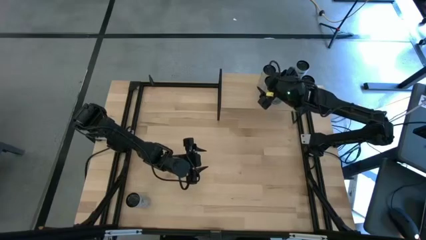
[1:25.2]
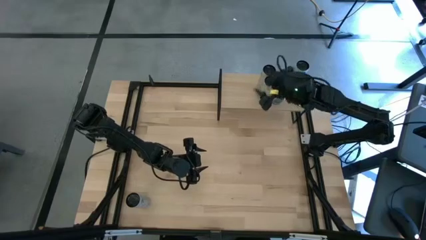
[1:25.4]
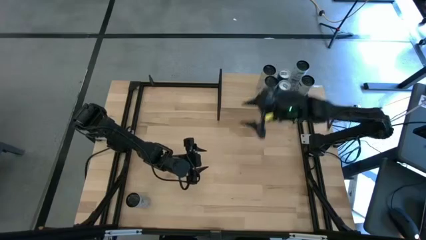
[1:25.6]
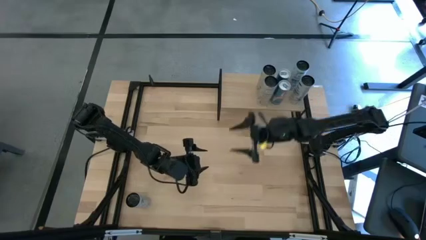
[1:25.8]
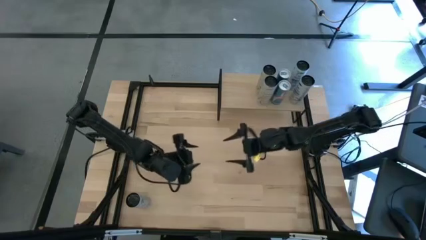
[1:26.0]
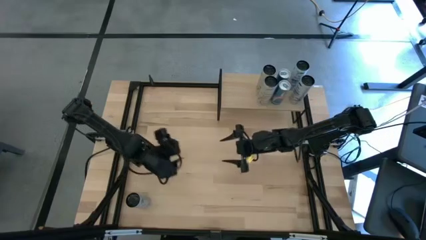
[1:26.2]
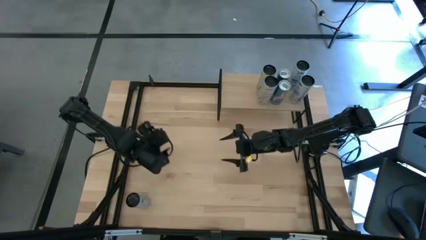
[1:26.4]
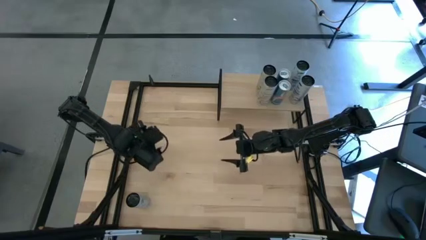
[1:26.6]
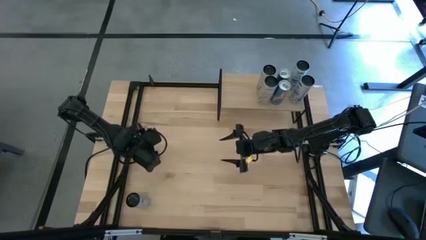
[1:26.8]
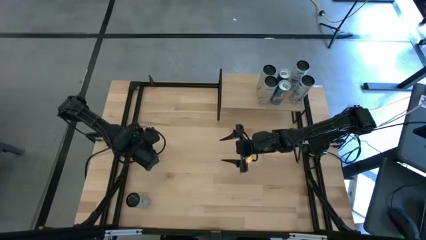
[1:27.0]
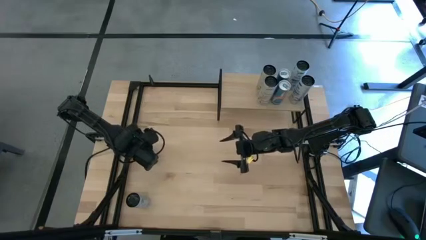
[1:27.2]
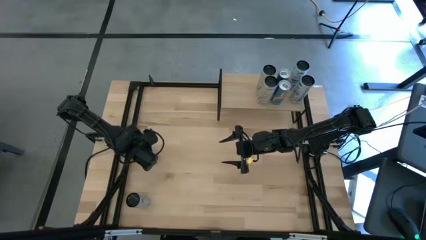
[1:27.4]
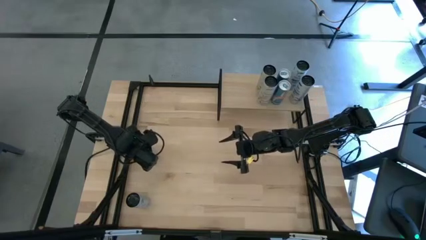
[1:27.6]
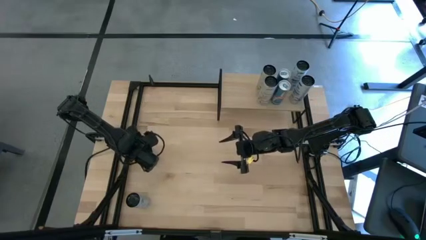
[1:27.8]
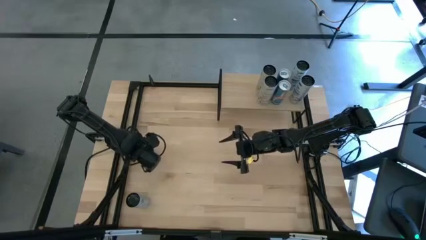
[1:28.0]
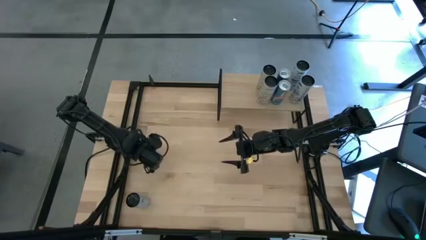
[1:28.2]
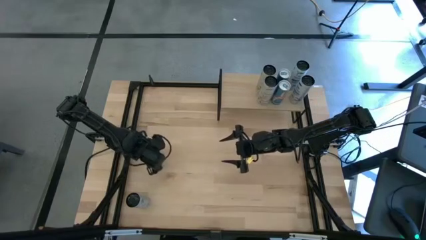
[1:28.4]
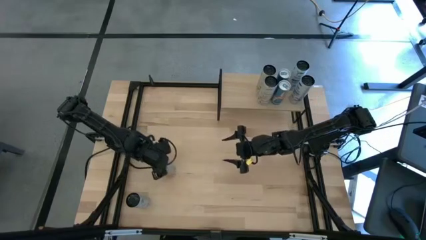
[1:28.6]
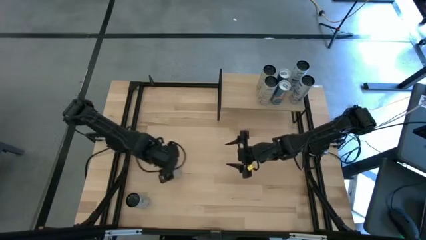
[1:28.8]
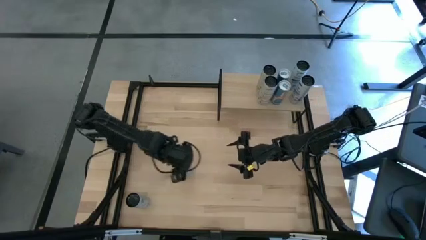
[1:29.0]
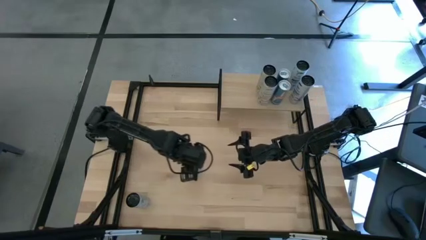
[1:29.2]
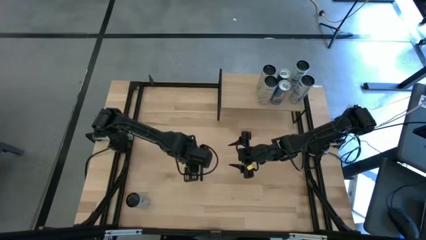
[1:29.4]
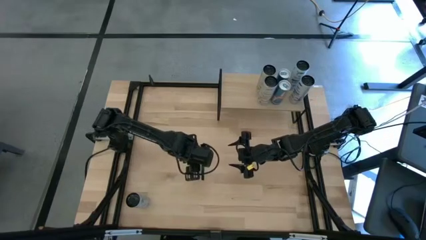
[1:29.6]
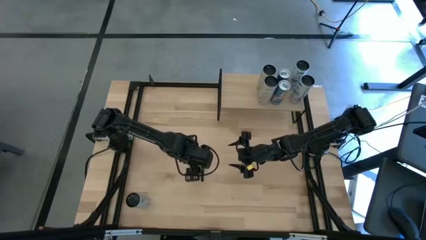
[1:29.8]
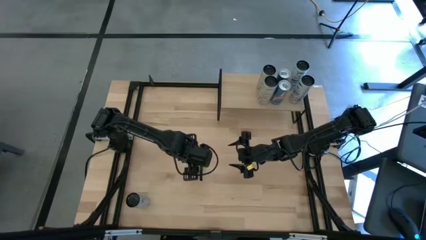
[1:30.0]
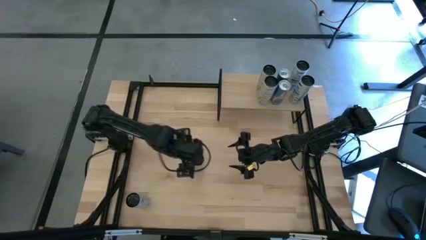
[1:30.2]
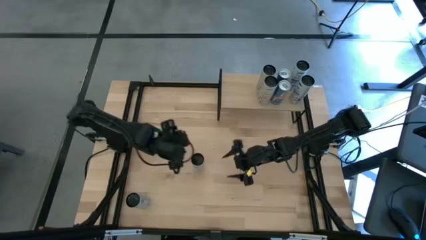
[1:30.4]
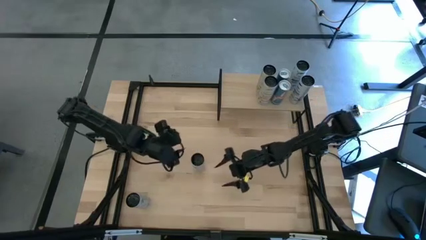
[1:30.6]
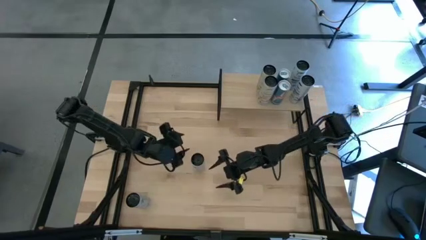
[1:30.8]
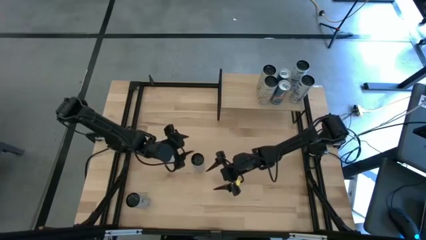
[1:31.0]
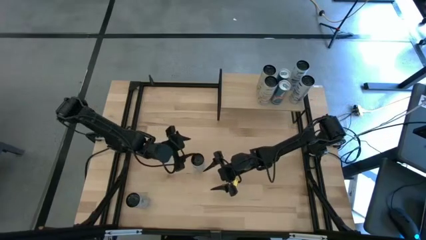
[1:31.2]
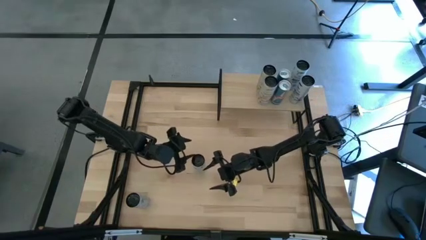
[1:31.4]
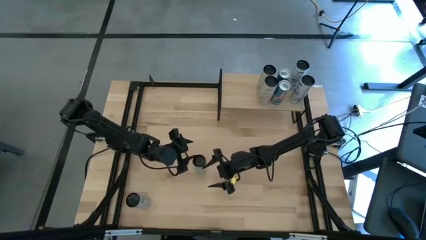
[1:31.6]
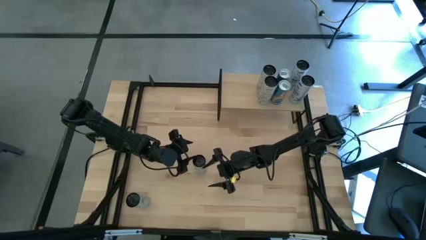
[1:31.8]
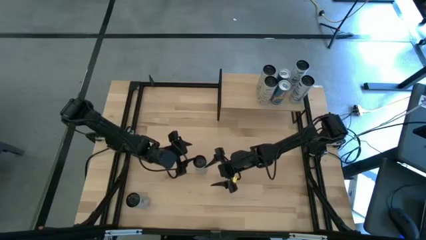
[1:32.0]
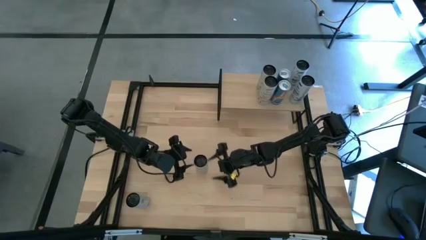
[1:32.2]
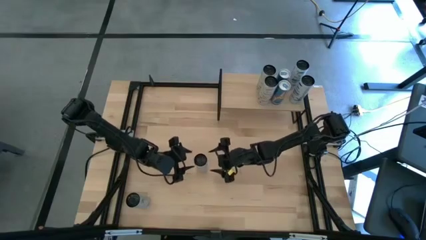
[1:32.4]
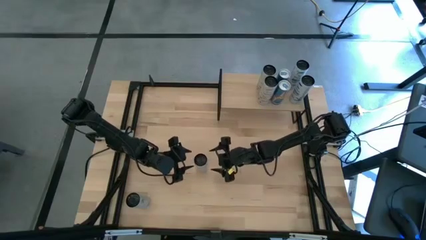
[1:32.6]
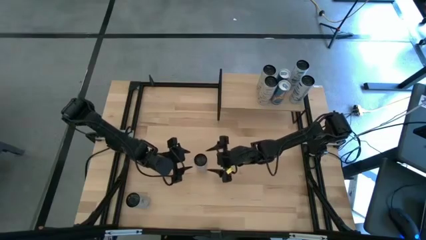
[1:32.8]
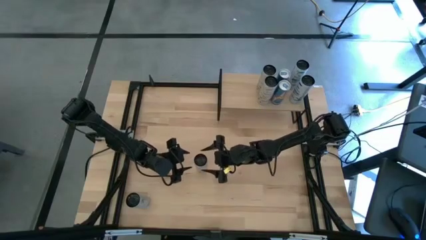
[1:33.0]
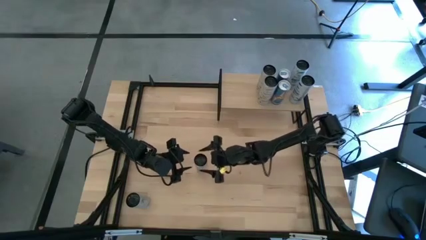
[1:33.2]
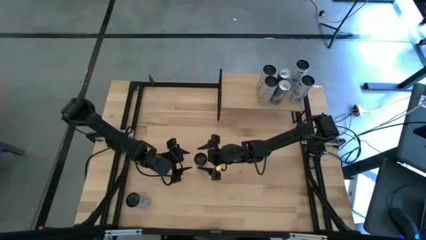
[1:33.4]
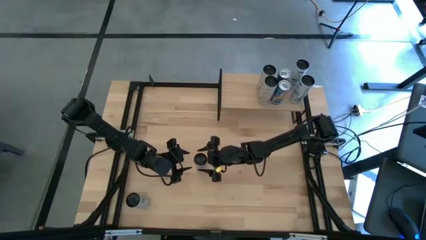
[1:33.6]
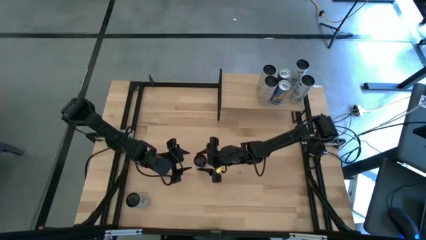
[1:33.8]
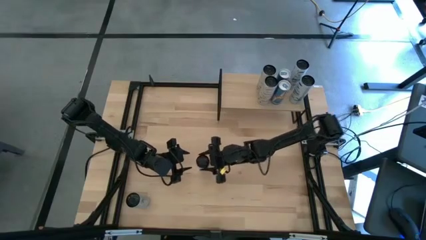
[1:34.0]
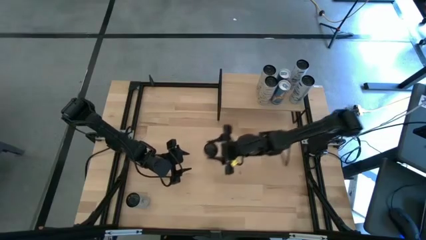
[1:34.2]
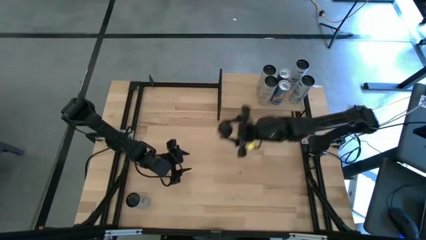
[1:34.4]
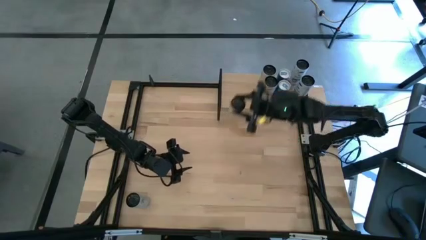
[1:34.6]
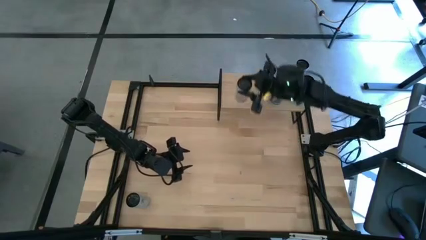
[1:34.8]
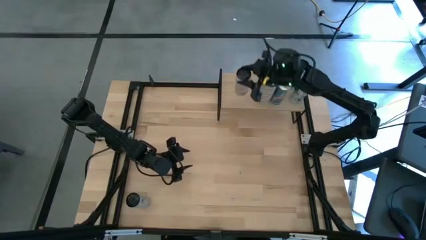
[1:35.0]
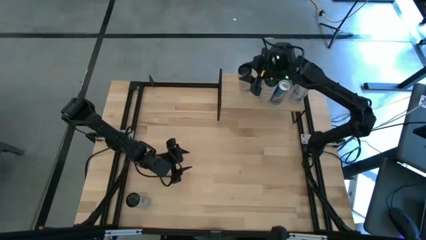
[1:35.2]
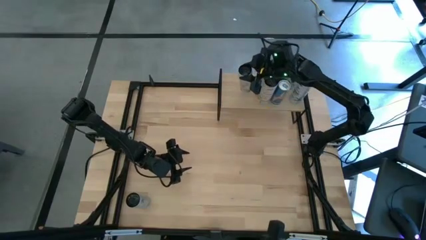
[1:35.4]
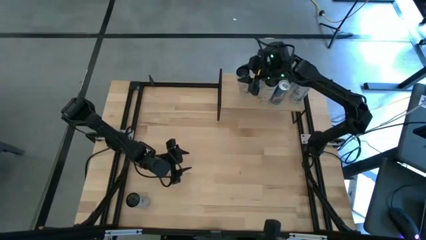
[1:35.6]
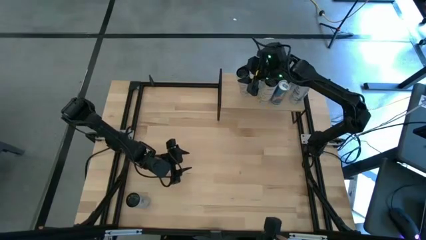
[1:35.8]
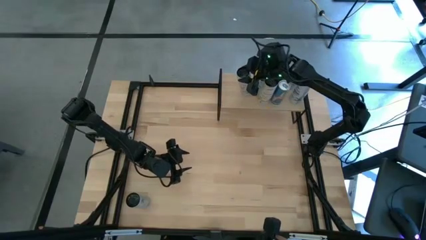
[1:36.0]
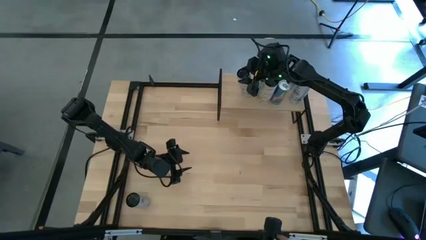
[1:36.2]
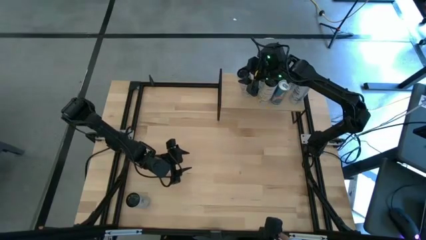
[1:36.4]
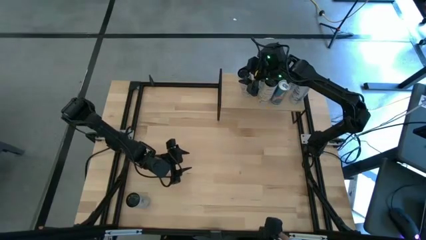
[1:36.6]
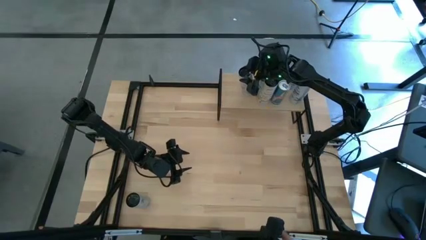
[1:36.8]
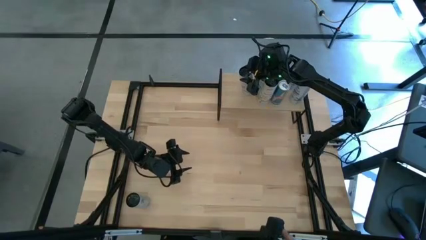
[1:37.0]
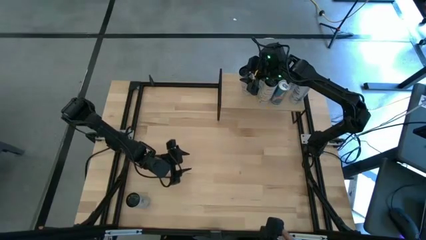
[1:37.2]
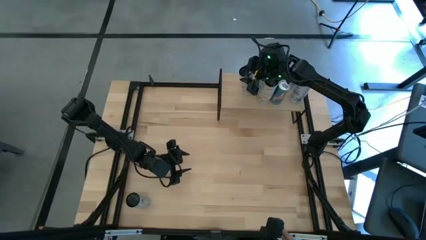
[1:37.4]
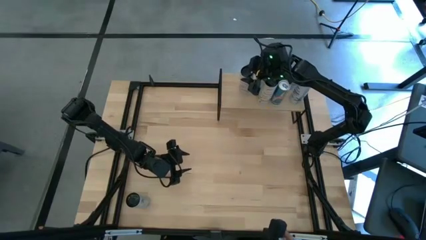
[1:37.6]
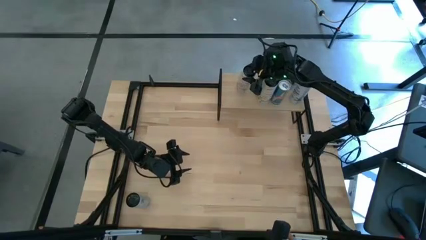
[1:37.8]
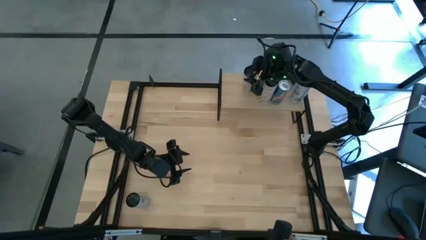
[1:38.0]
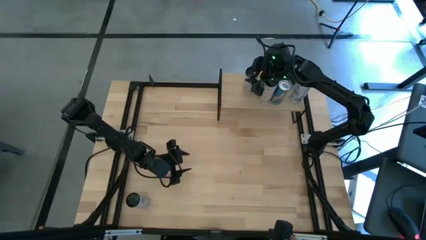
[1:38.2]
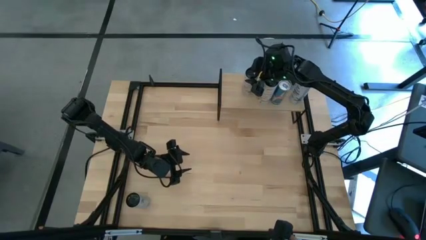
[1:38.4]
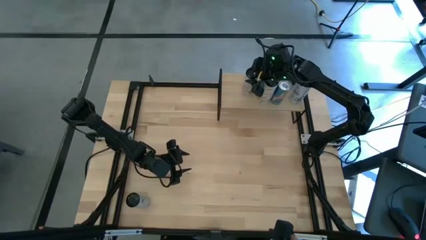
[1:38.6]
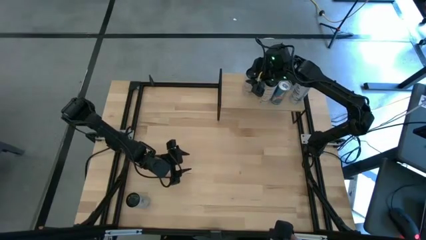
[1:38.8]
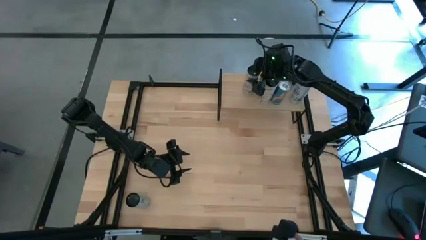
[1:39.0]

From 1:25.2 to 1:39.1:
Task: Place canned beverage on shelf
Put the white and pink soda can on the shelf
